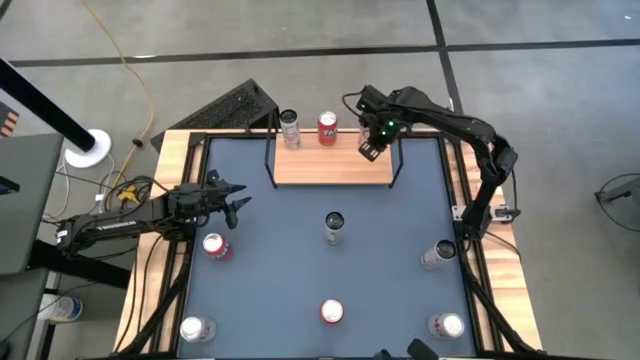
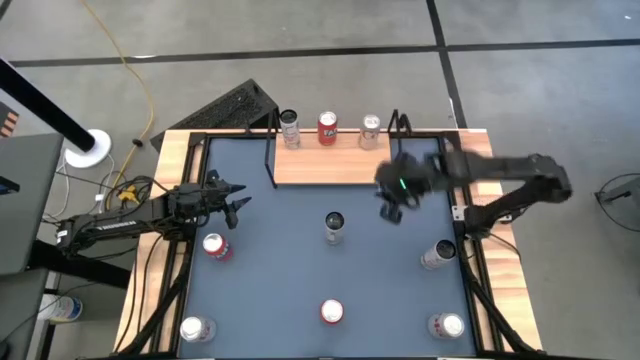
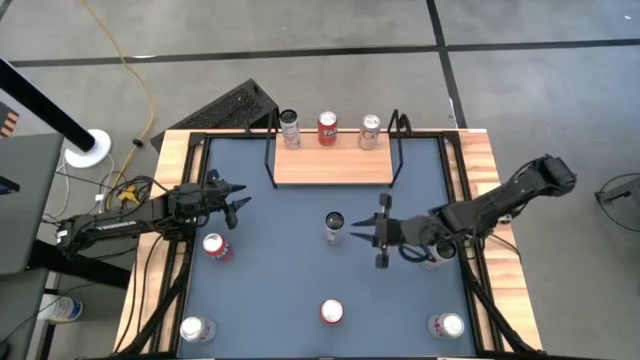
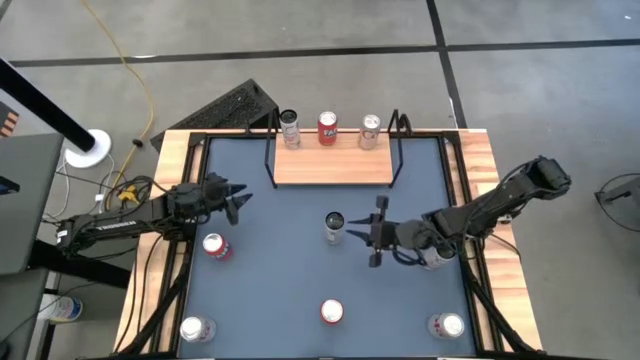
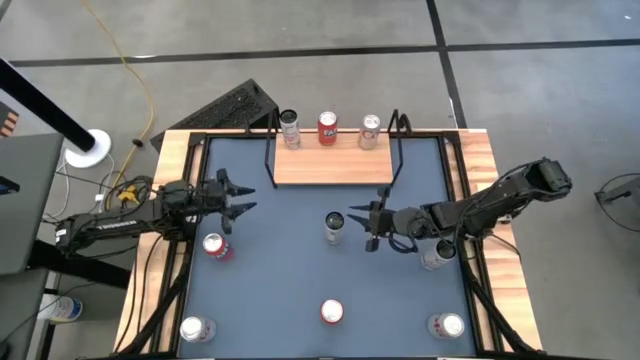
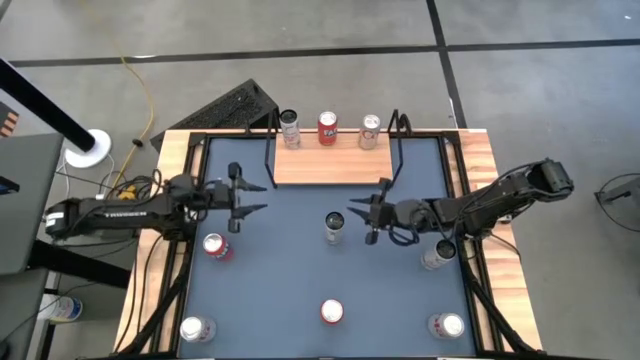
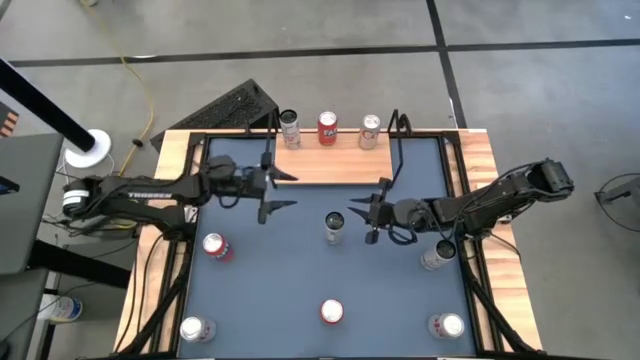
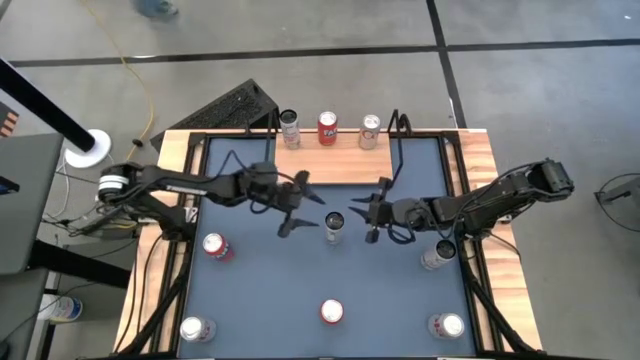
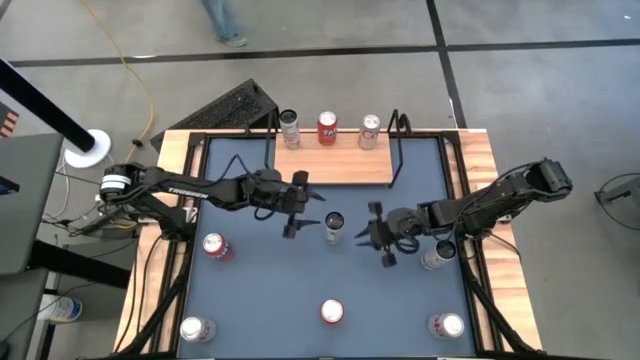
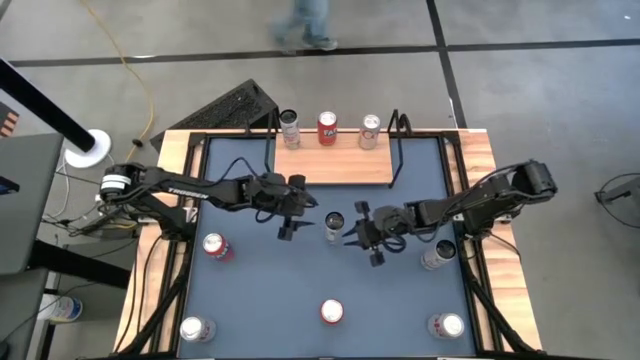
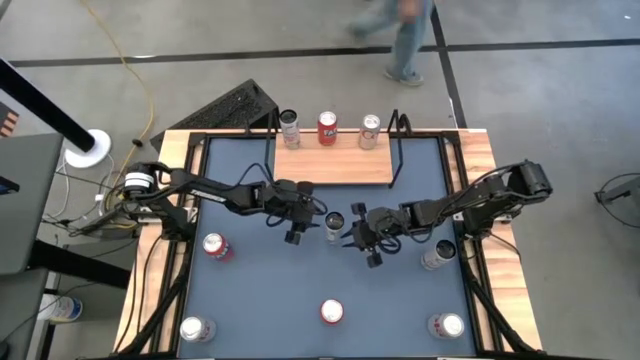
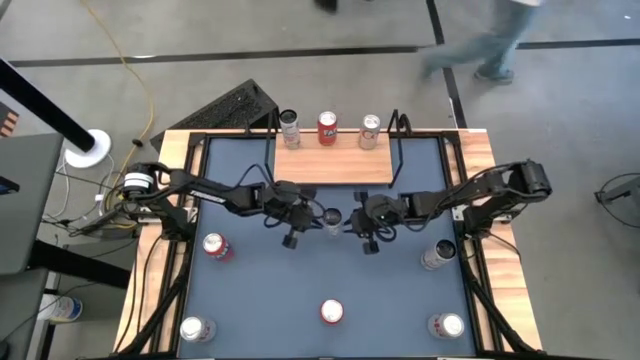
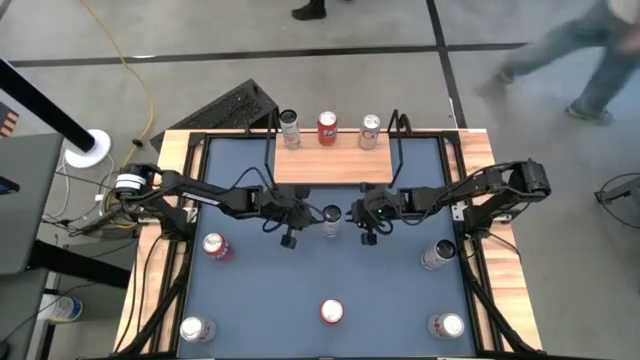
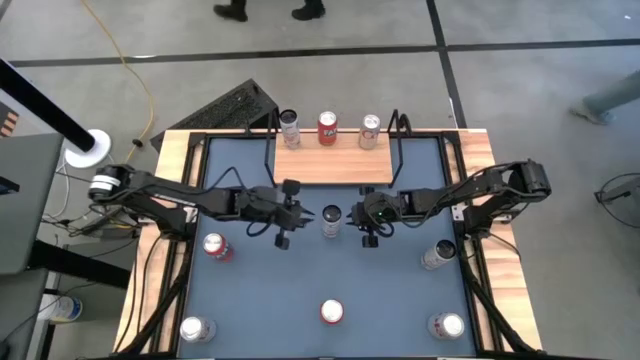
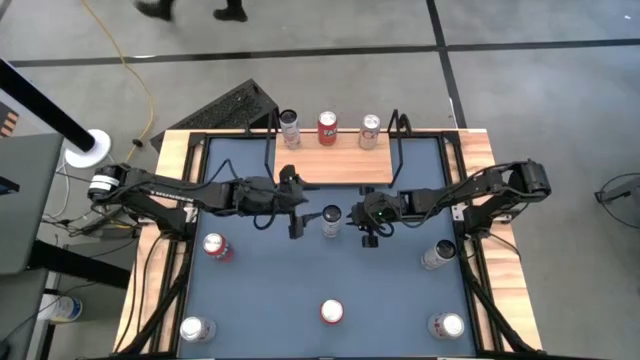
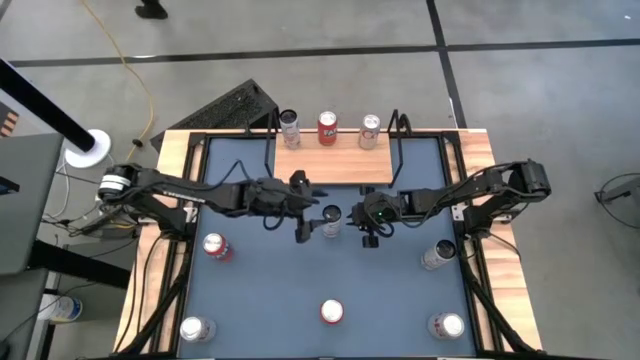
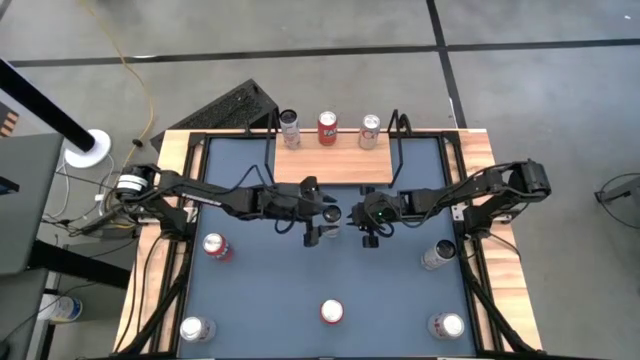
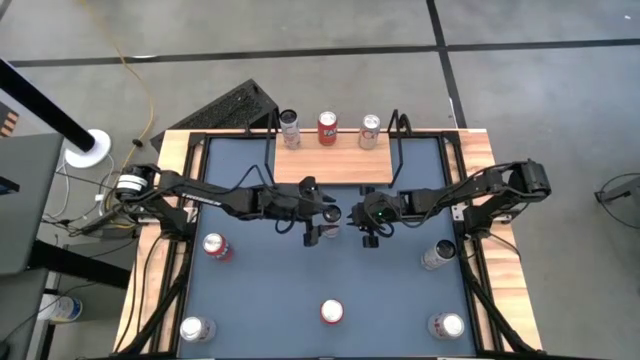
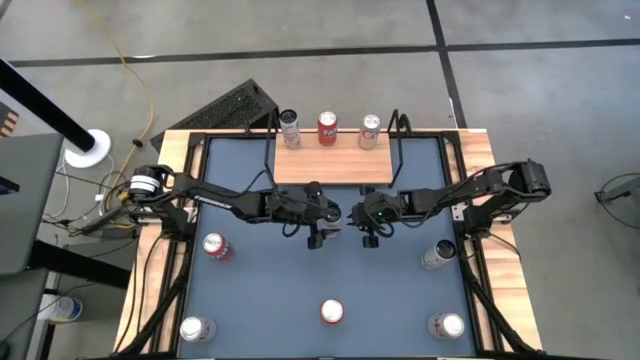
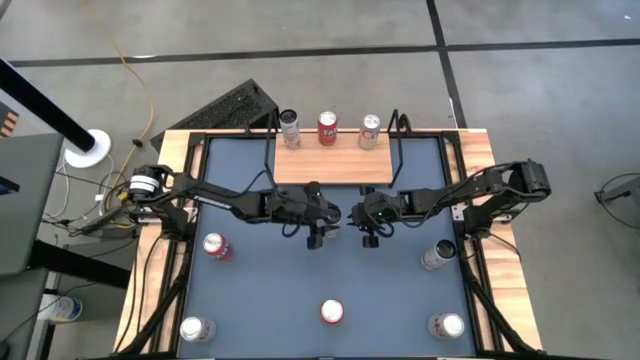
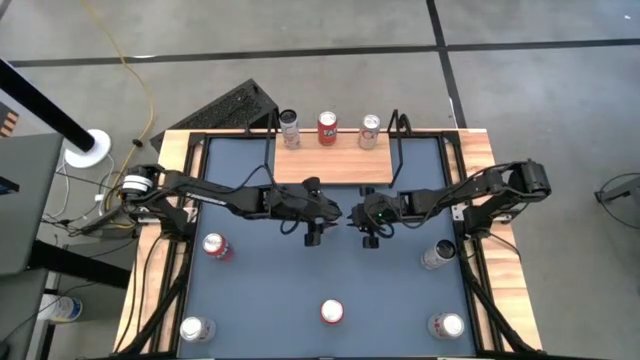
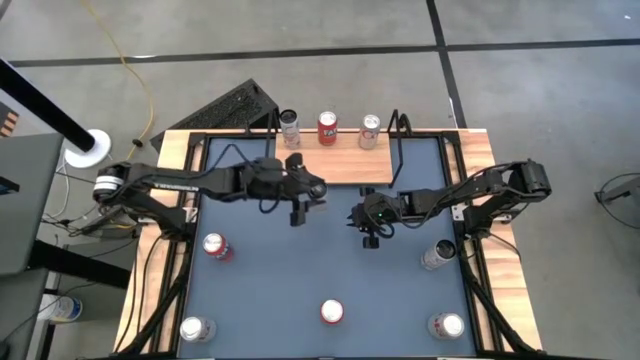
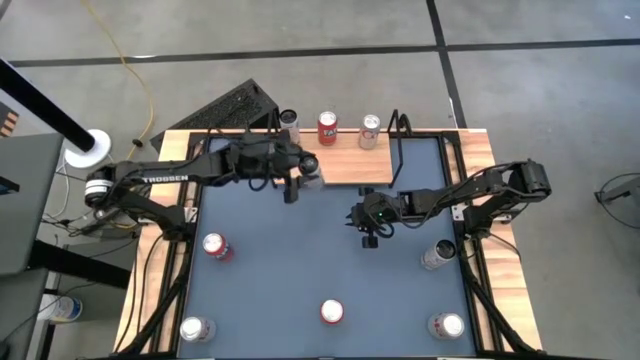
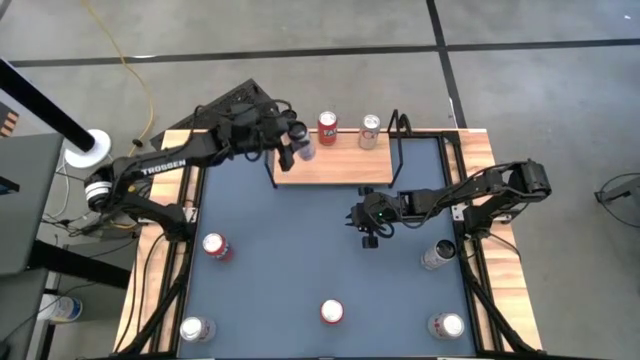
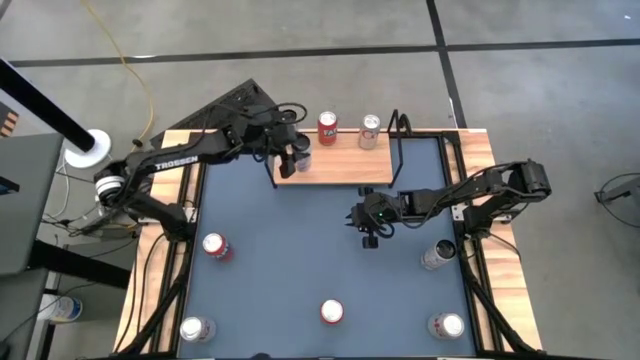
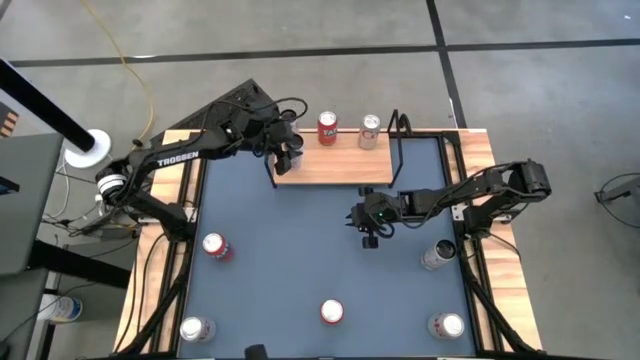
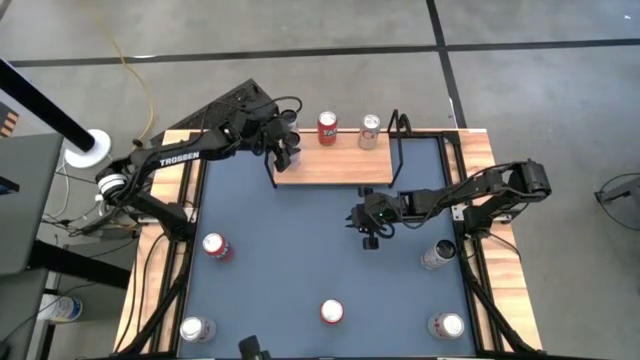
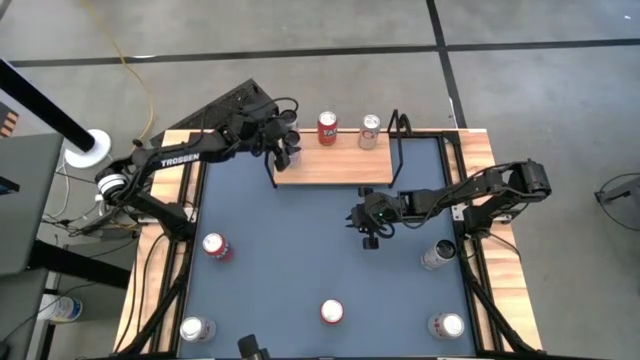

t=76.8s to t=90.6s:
Task: Place canned beverage on shelf
Put the left white-pink soda can on the shelf aligned with the other white-pink soda can

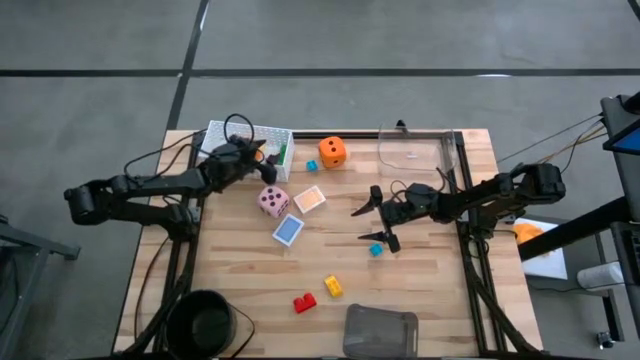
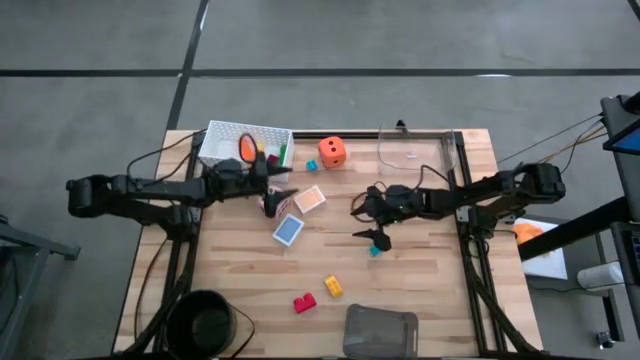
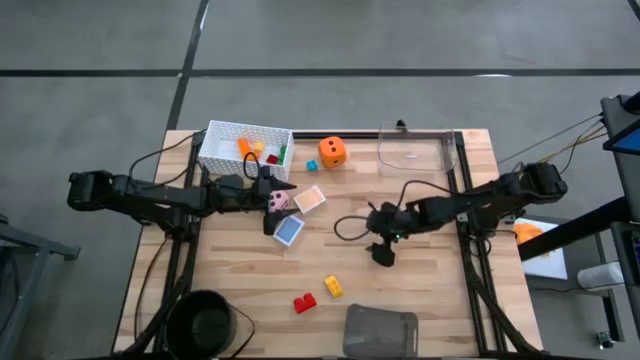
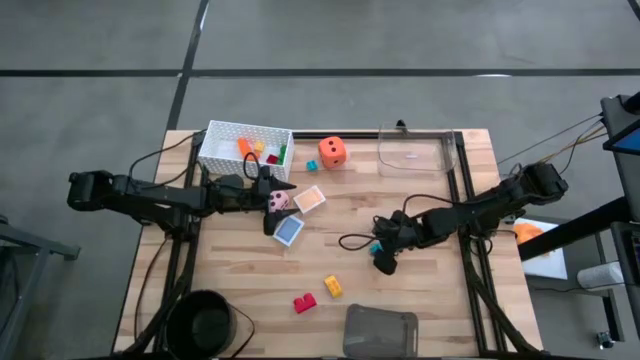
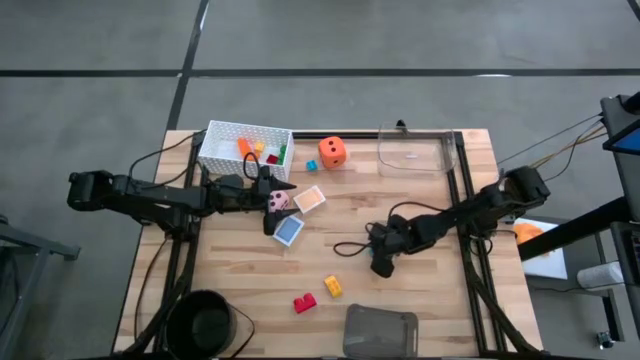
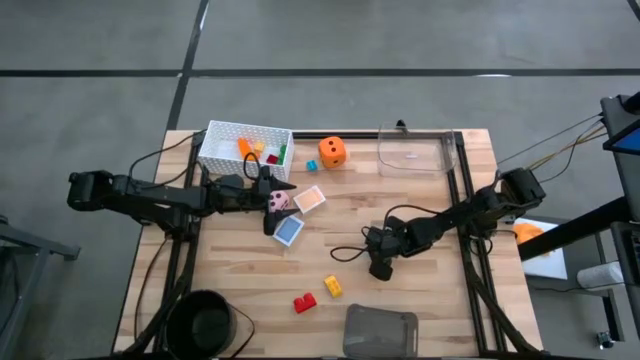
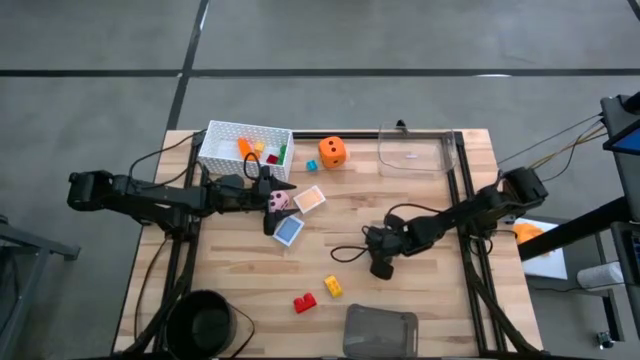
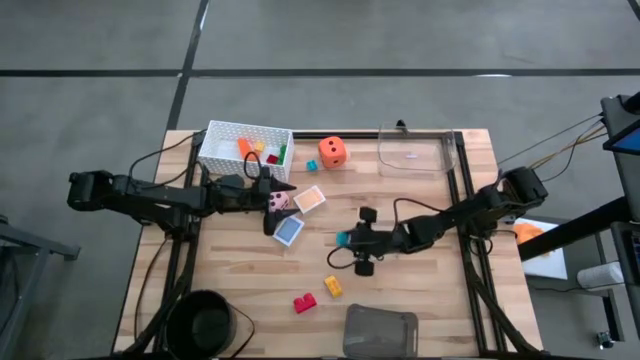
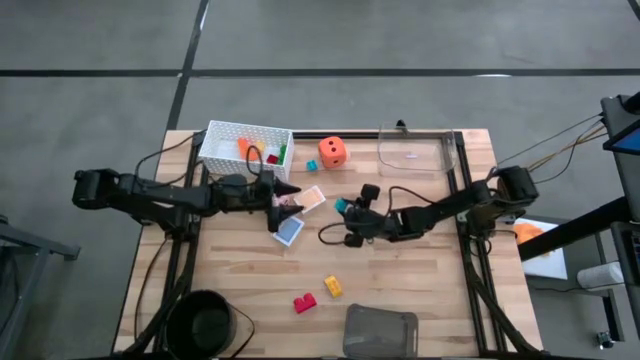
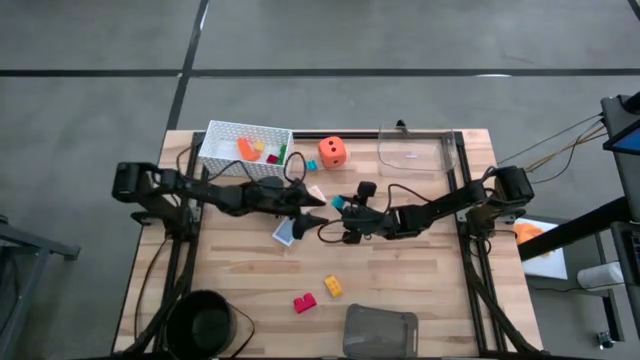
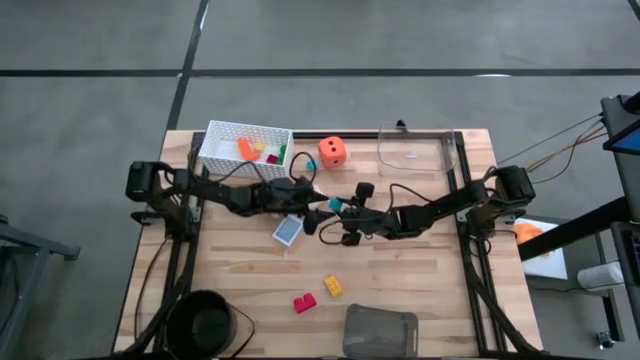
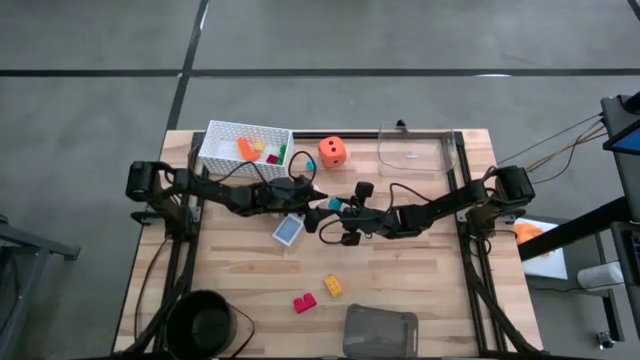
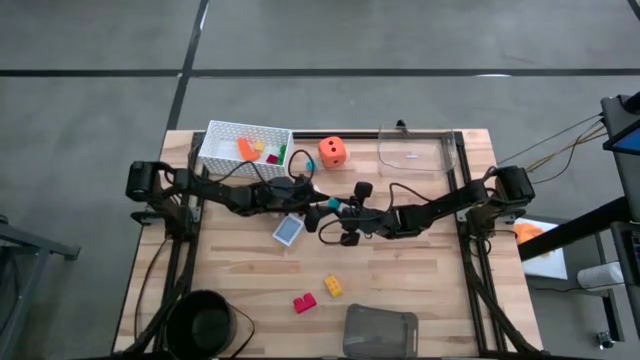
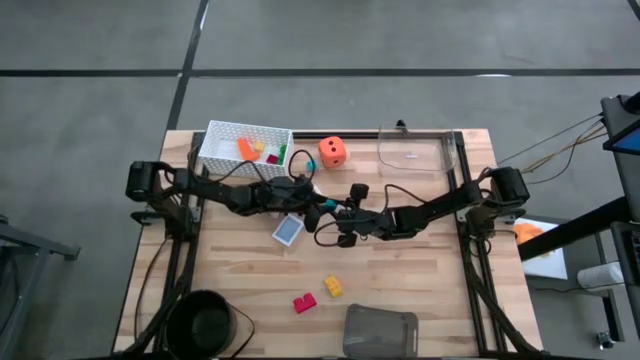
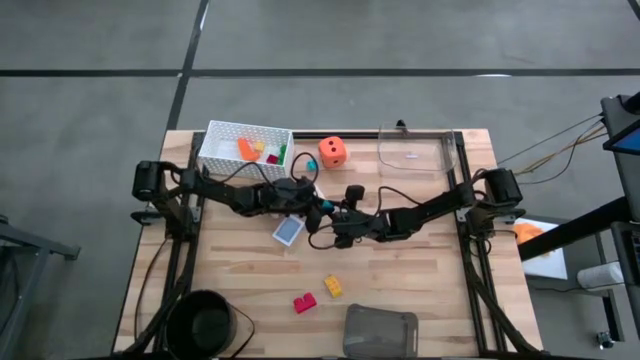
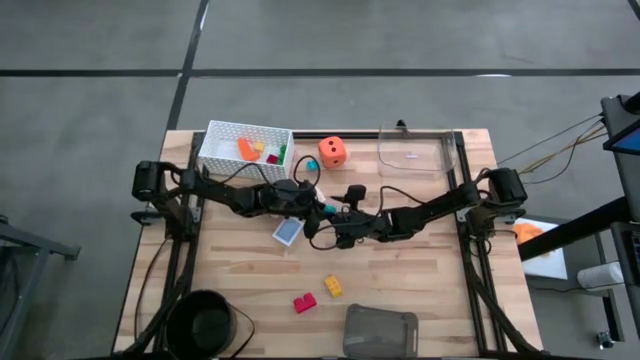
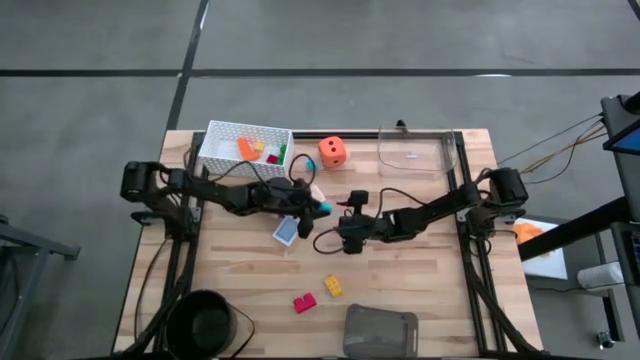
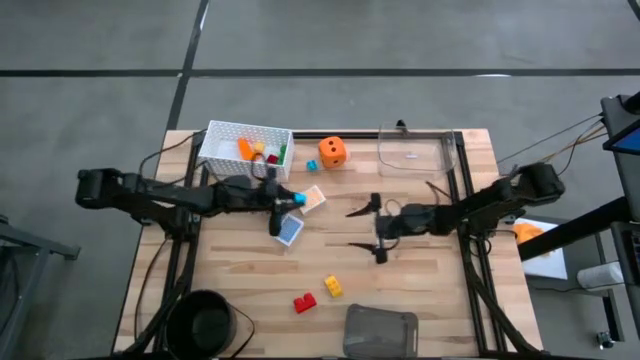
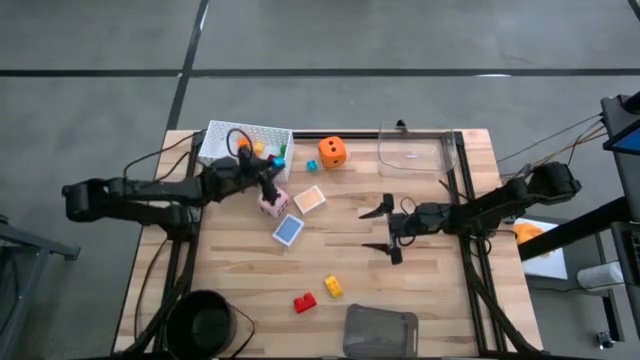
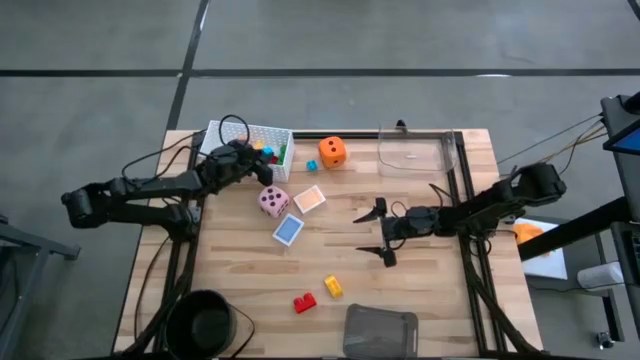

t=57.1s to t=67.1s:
Task: Pick & Place Toys
Put the bottom small blue game piece into the white bin
